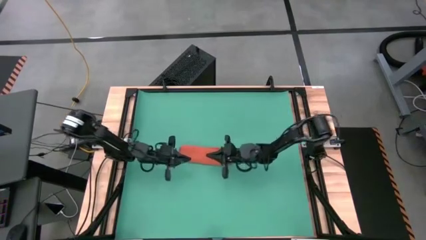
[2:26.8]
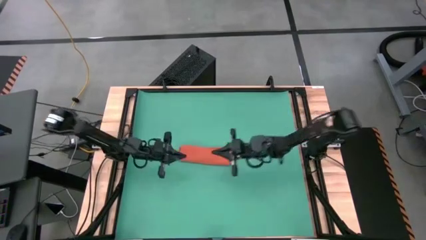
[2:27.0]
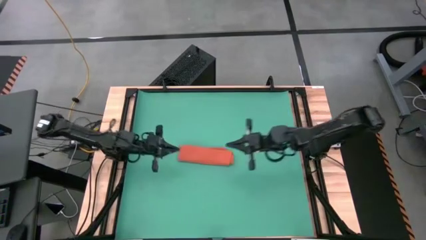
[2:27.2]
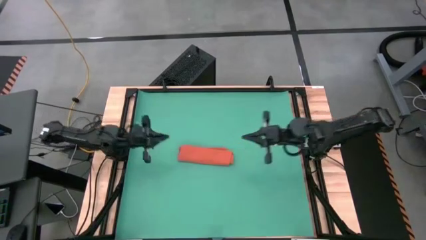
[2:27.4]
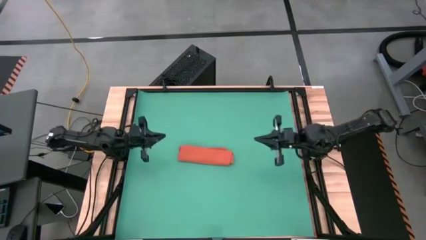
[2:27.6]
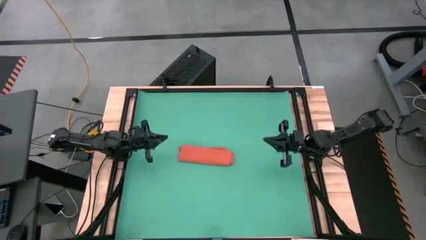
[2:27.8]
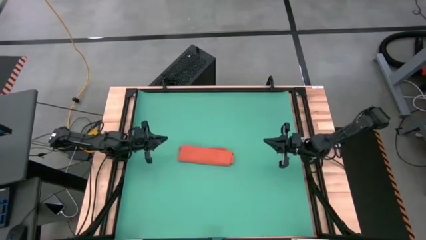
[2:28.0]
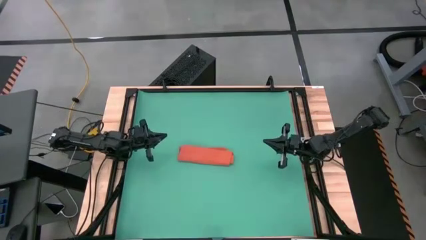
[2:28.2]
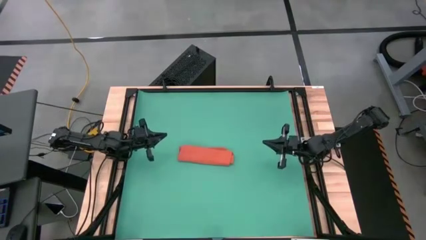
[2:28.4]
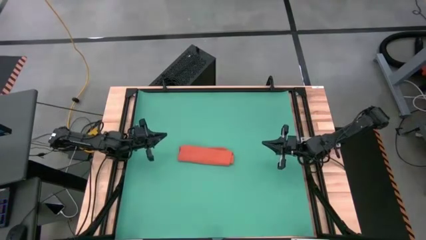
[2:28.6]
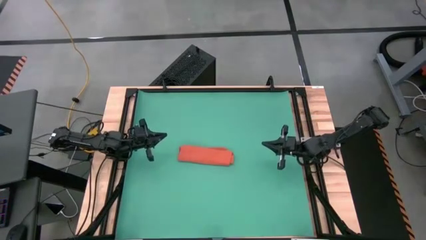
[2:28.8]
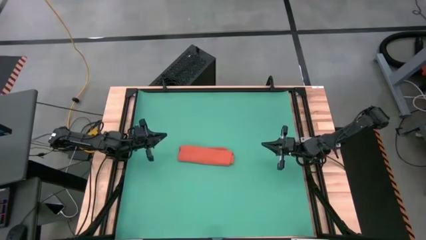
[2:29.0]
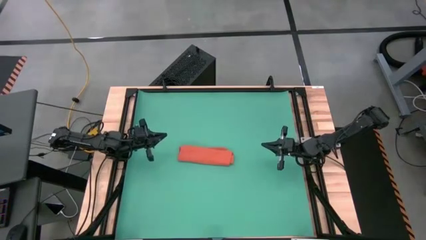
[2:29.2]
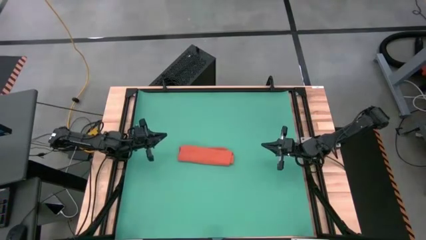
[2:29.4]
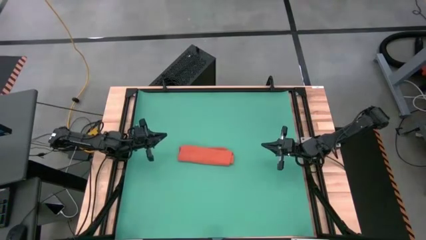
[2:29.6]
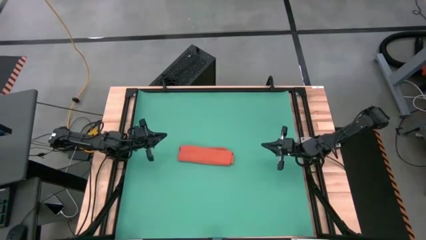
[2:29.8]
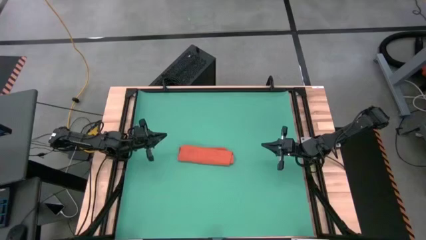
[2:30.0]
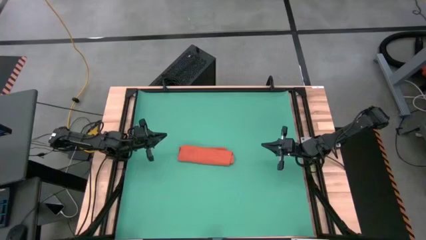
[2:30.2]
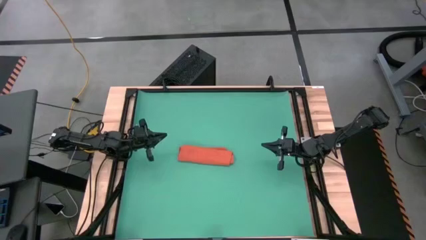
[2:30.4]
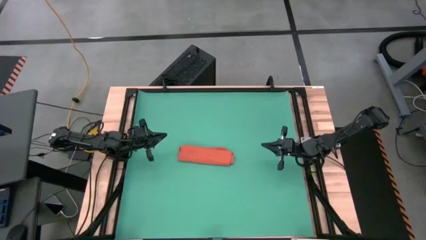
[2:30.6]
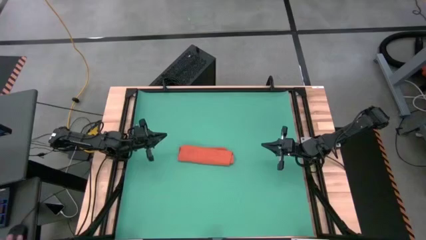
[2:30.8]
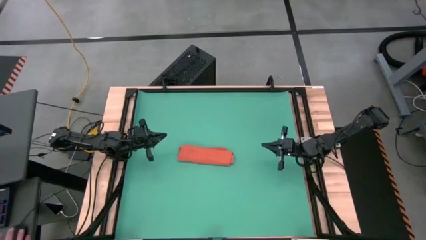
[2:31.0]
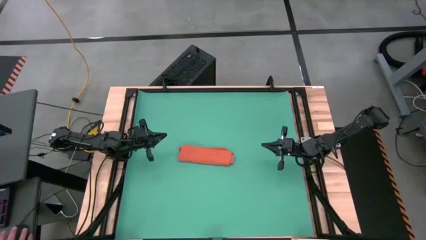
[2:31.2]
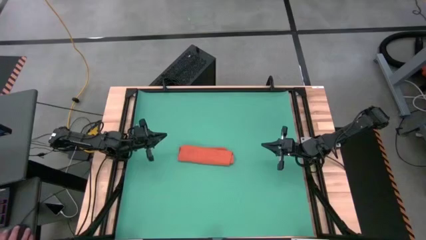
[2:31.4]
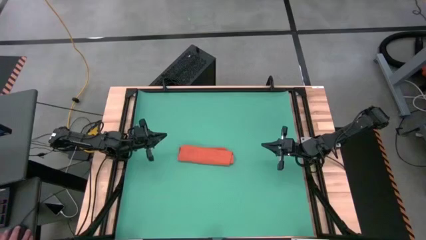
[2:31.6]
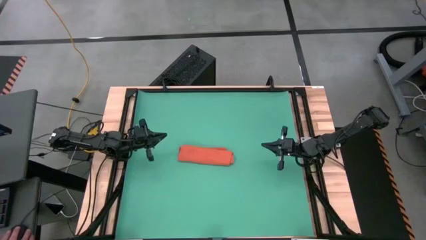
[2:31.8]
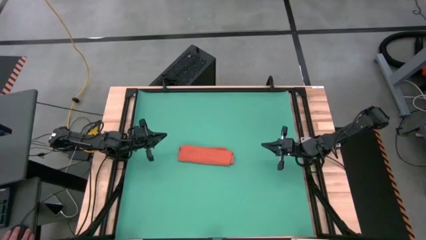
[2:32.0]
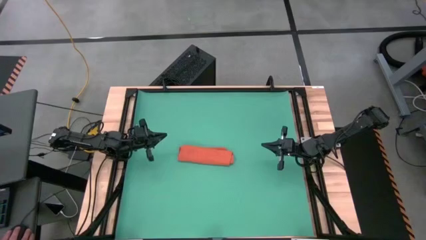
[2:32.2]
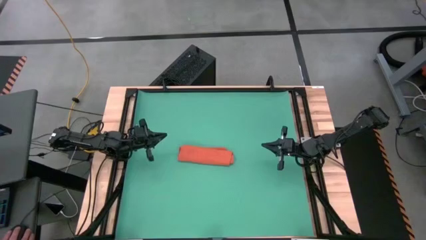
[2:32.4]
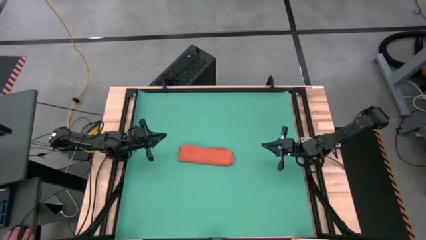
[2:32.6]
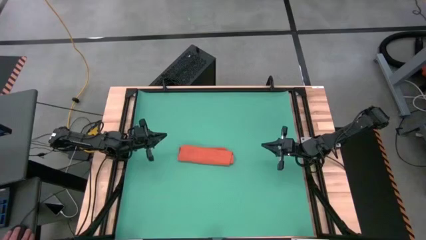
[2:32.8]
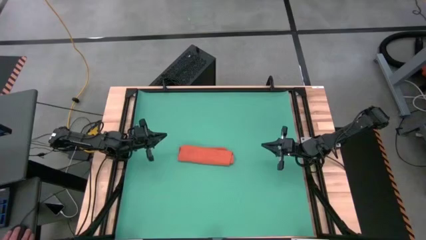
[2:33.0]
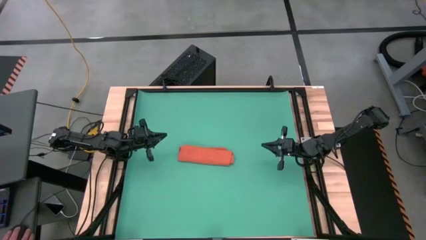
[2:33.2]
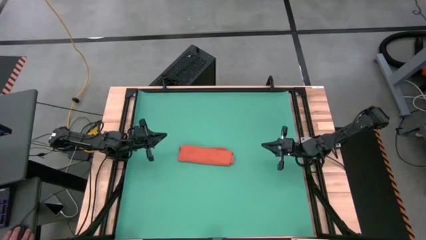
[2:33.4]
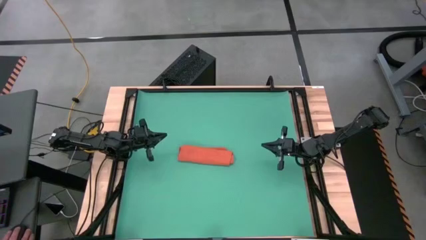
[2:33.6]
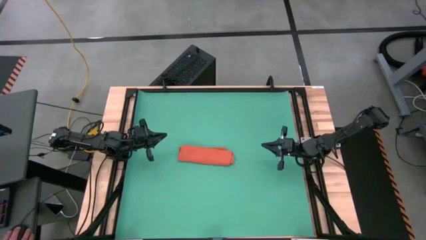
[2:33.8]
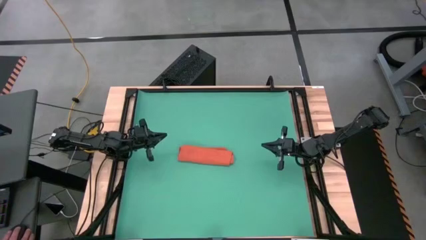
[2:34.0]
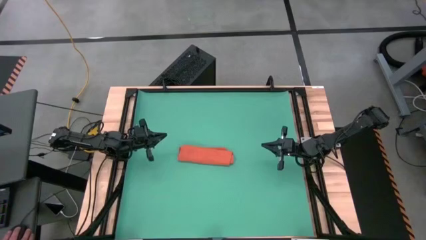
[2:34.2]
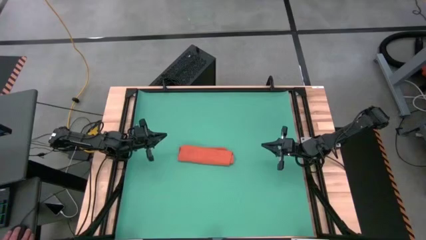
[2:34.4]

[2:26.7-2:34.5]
Task: Roll towel into tight, uniform cylinder
Return to Home Position

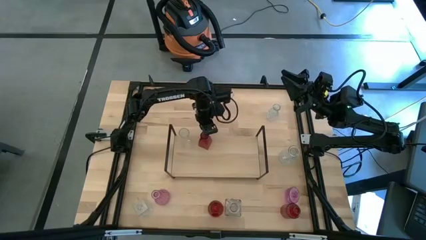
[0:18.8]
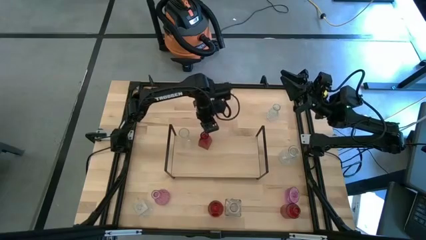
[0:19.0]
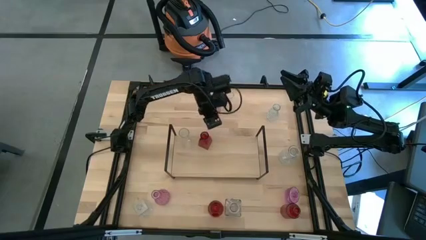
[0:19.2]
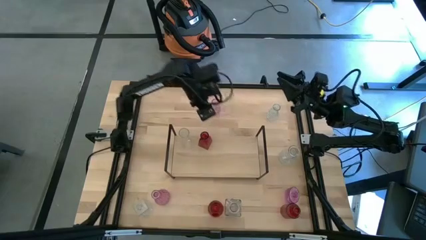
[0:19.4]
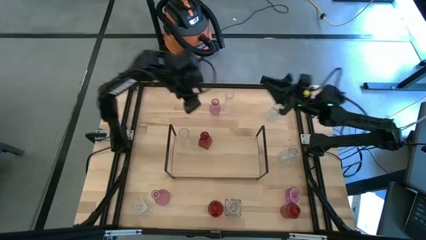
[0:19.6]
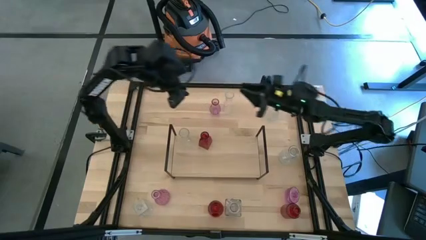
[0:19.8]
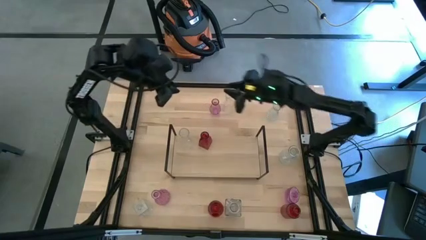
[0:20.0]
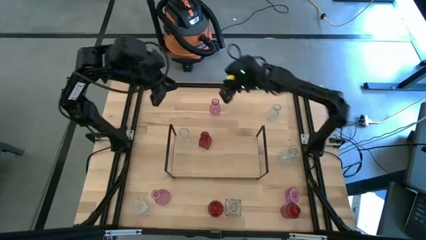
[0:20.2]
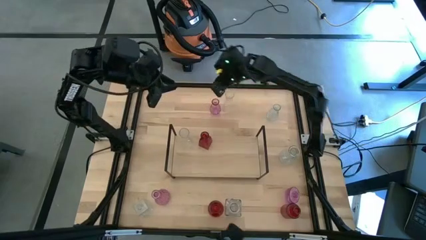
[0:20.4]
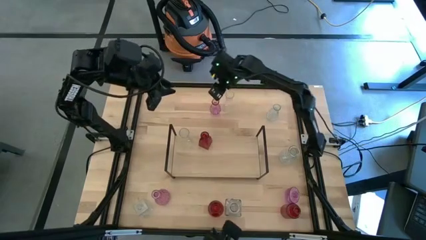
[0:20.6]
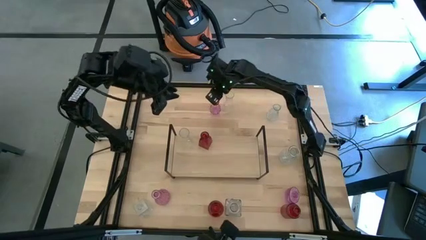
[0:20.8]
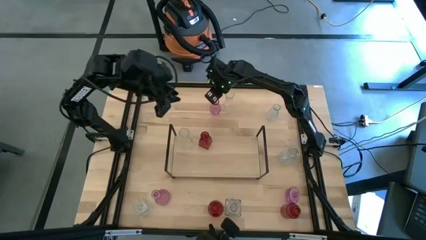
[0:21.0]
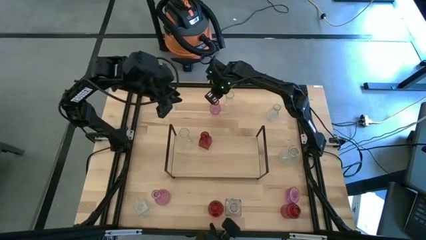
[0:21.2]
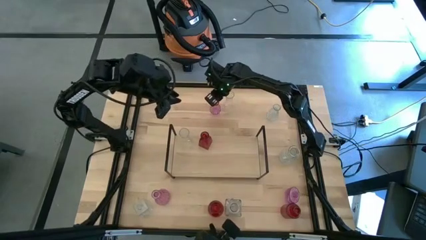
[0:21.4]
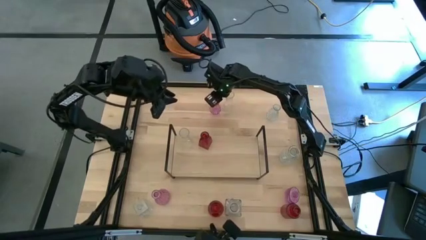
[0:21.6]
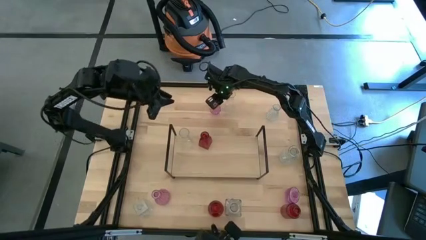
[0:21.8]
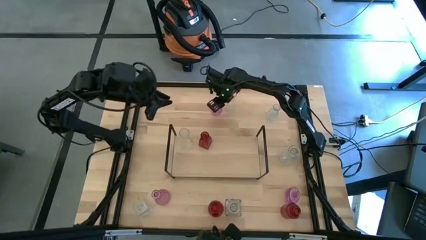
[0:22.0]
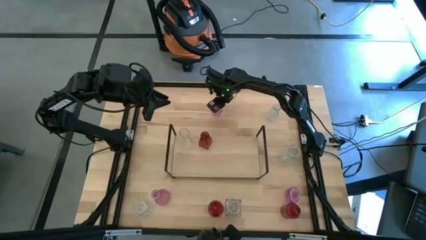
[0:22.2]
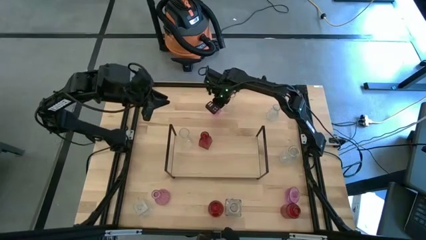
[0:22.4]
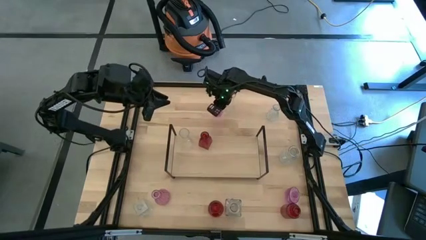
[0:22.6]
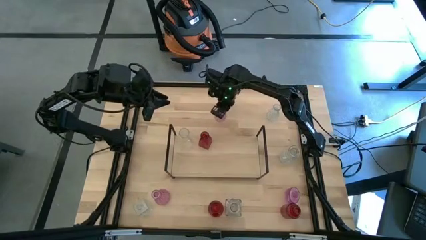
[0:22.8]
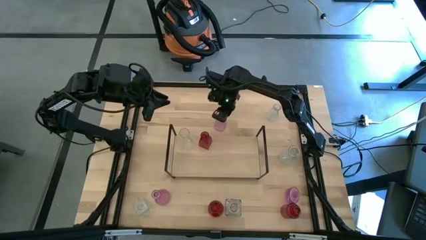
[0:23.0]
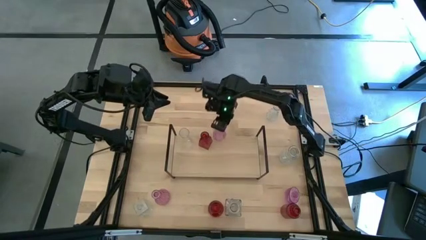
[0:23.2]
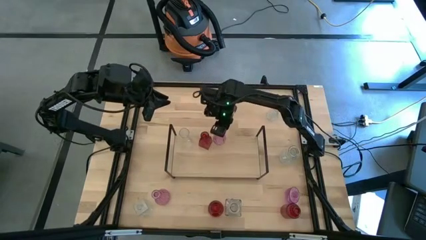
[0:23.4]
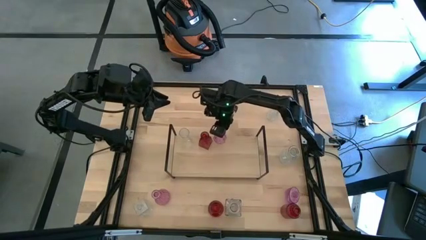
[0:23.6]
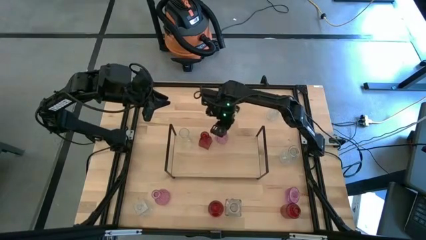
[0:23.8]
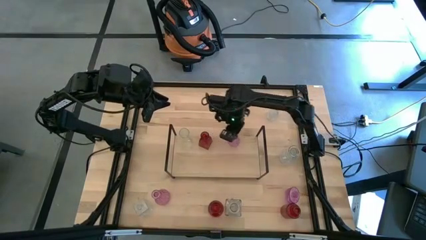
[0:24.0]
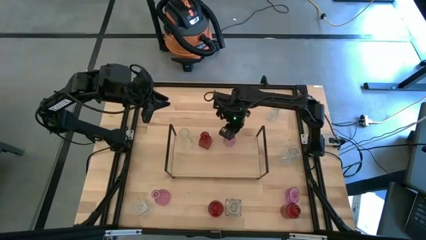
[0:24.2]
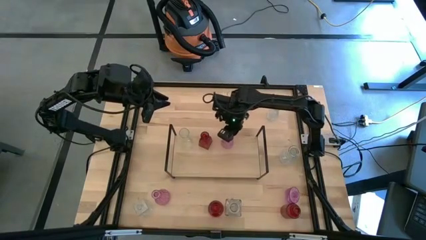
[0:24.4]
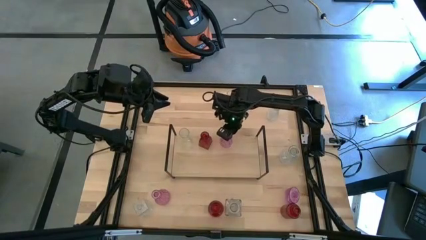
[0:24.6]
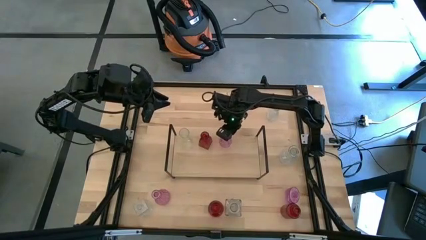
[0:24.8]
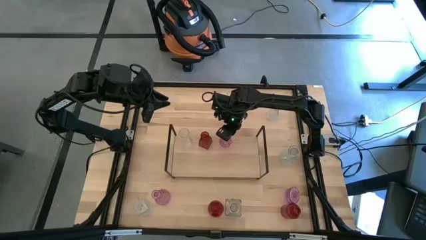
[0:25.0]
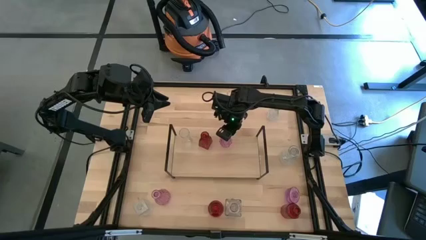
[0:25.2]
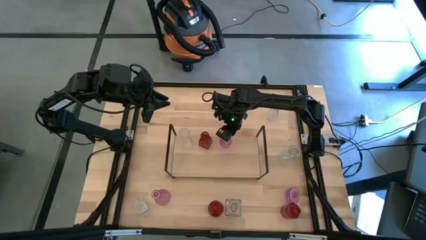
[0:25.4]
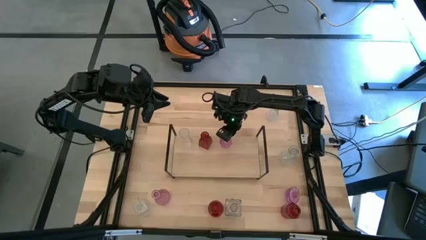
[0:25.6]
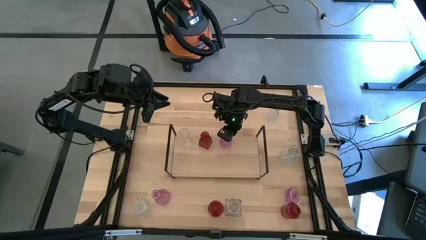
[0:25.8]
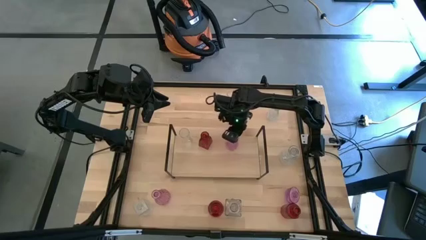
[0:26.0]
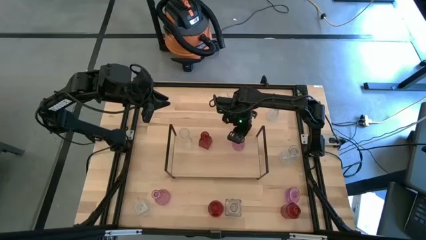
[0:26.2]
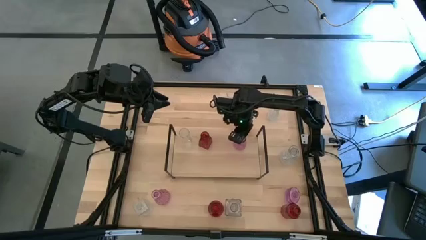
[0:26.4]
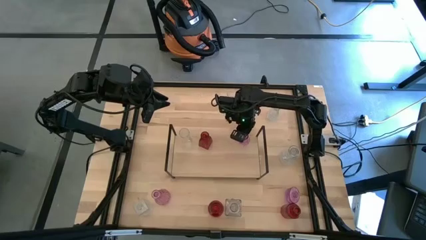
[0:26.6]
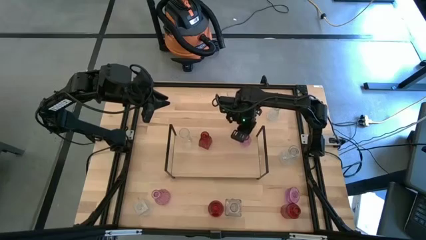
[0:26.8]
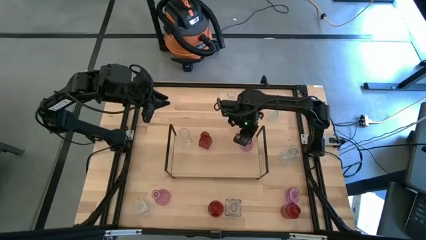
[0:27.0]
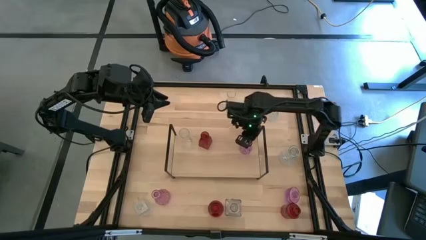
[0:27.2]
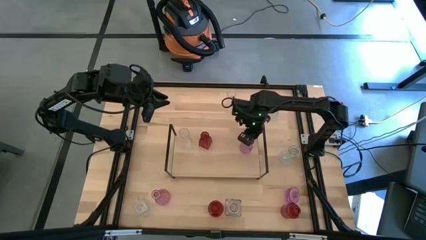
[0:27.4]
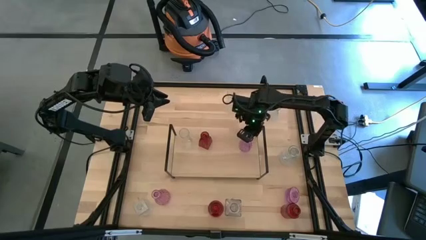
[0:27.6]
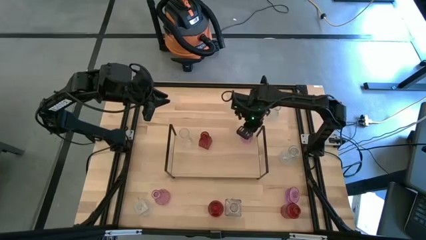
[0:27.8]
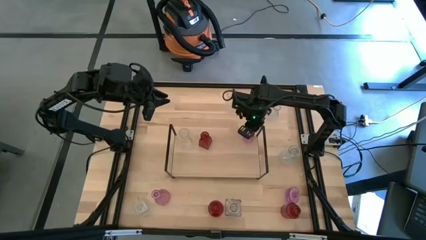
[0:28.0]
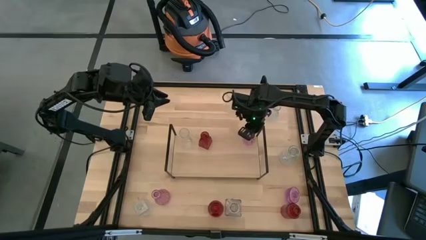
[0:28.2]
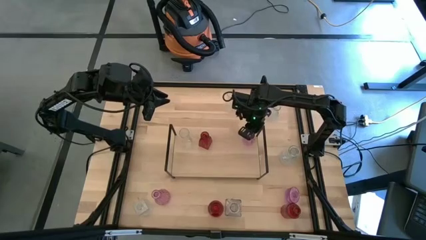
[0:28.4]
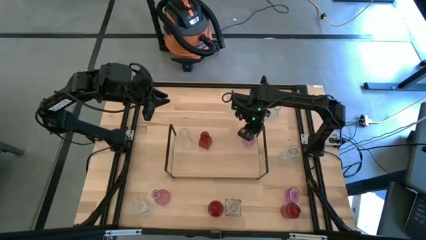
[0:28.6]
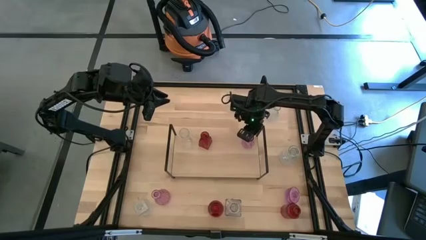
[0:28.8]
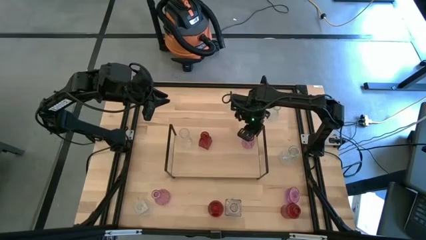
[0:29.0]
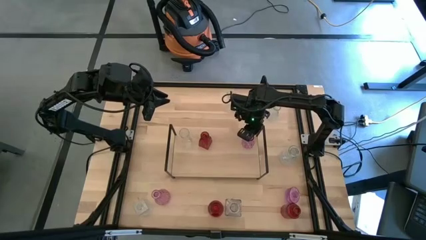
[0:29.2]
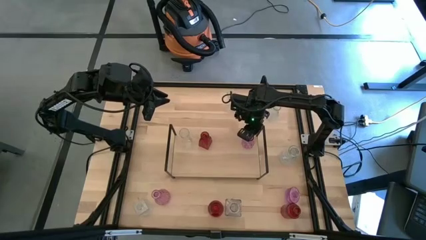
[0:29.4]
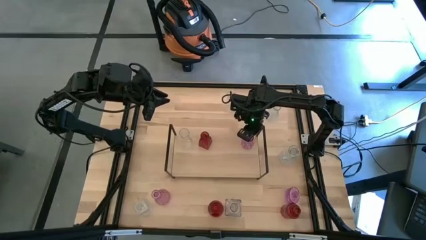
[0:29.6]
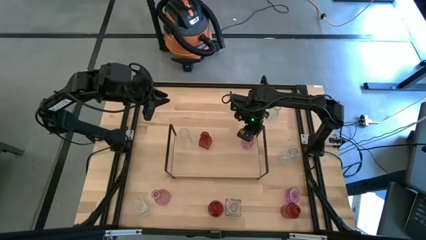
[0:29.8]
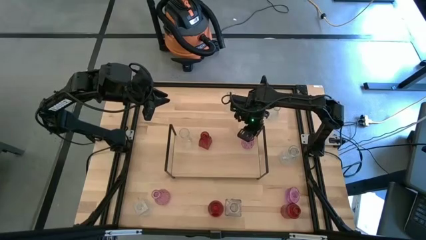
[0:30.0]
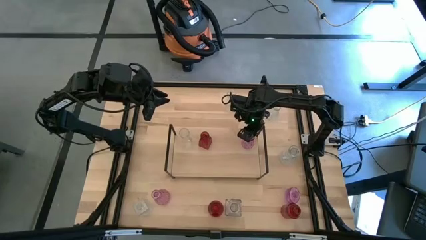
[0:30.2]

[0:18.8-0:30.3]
Task: sort vases onto shelf
Put the top center purple flower vase on the shelf
